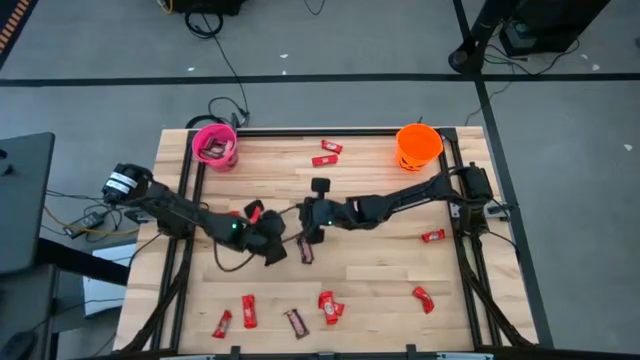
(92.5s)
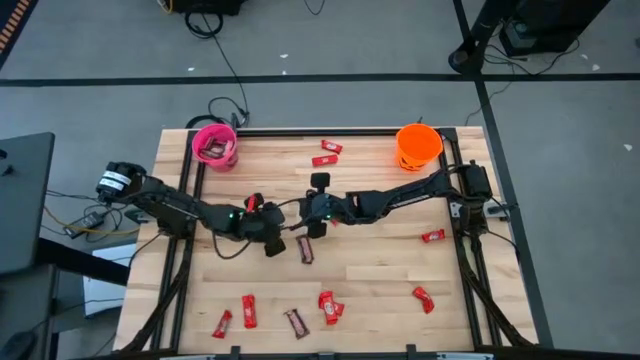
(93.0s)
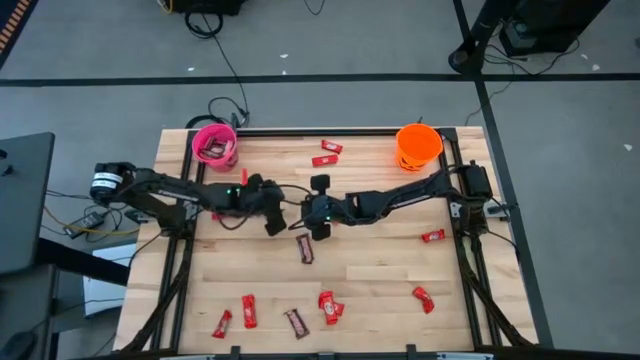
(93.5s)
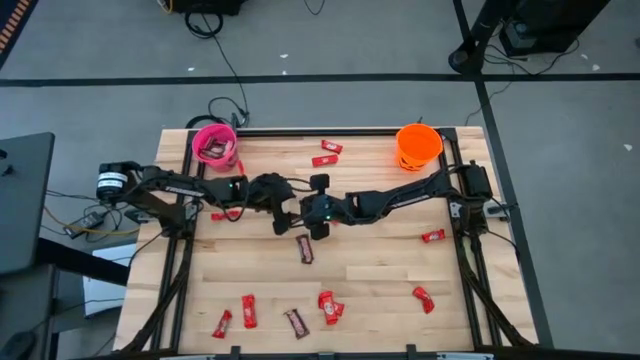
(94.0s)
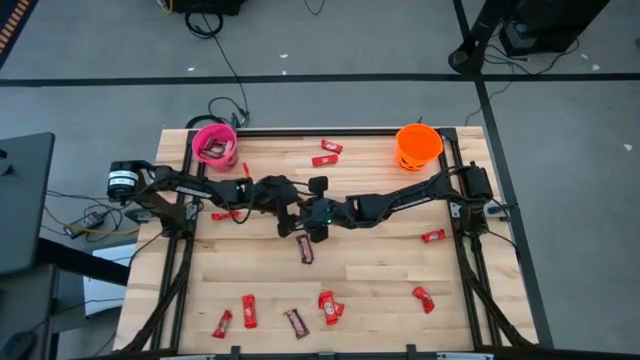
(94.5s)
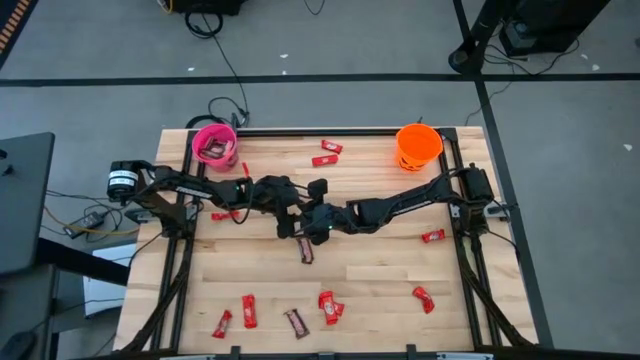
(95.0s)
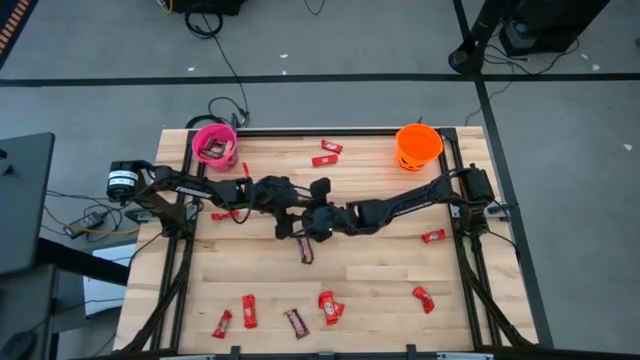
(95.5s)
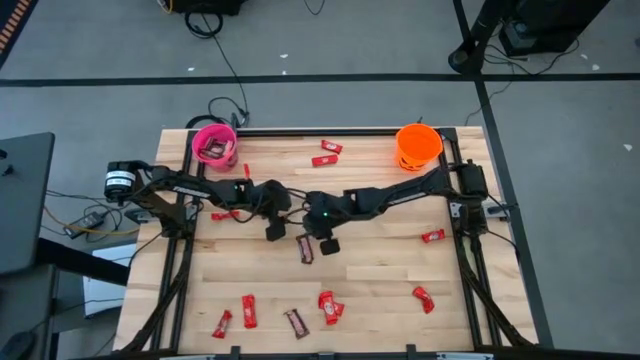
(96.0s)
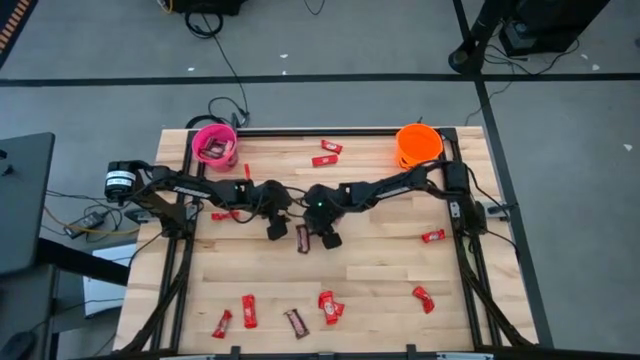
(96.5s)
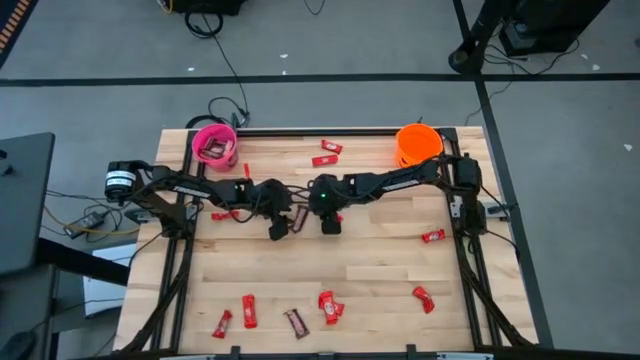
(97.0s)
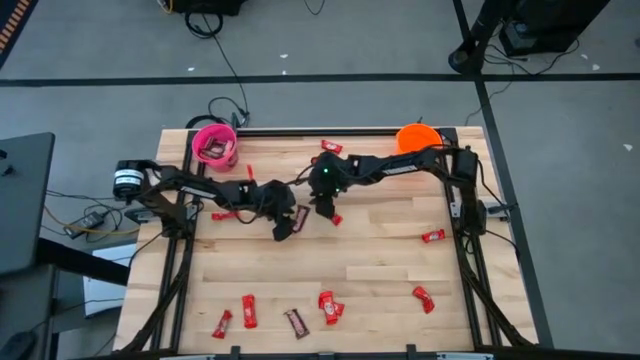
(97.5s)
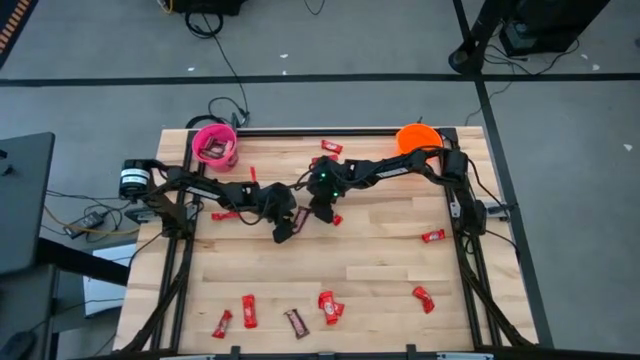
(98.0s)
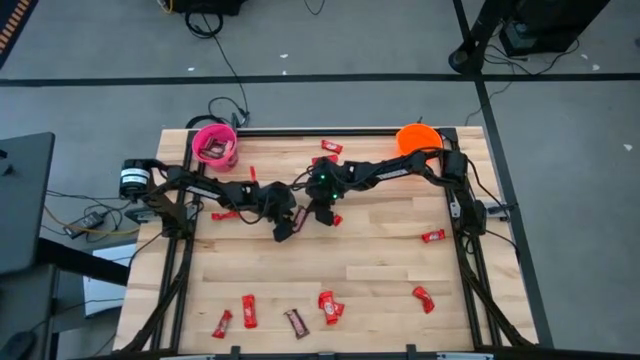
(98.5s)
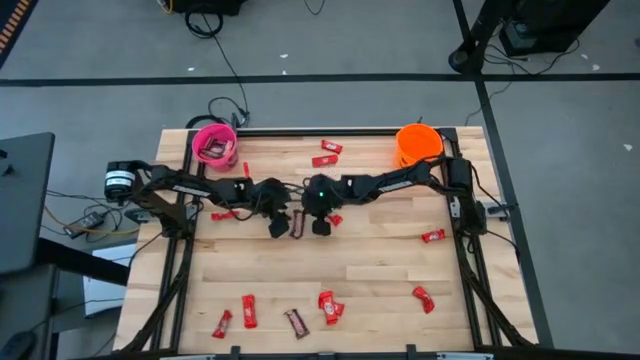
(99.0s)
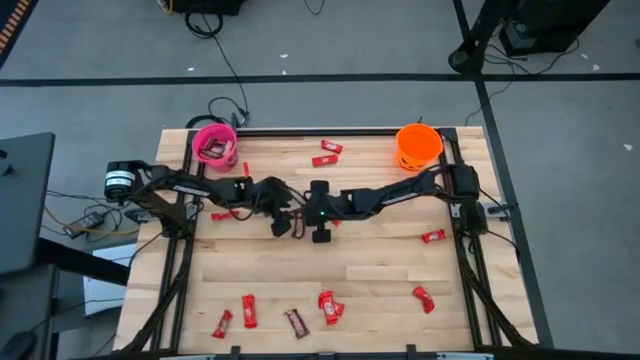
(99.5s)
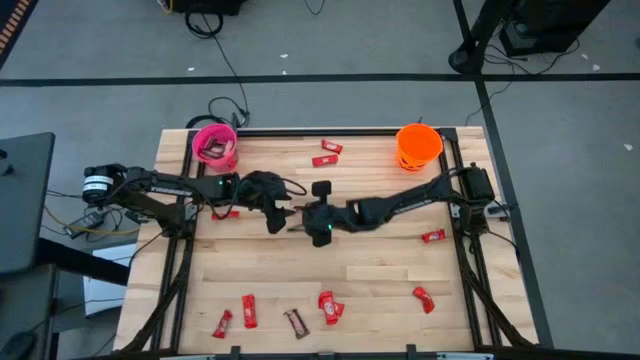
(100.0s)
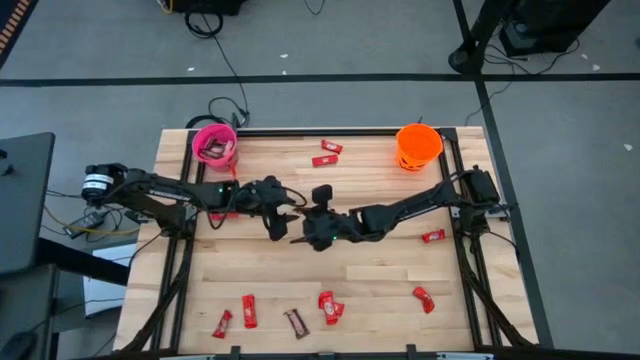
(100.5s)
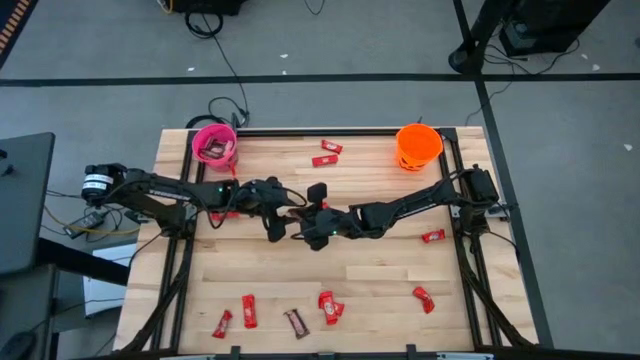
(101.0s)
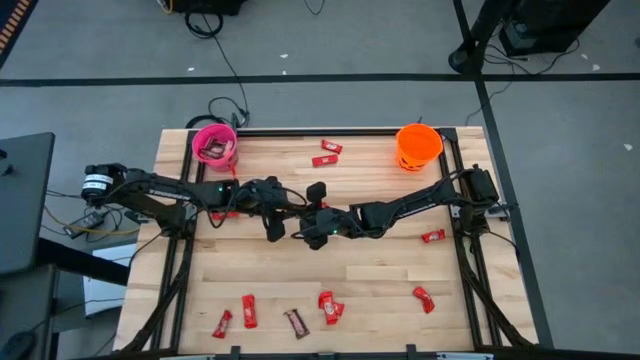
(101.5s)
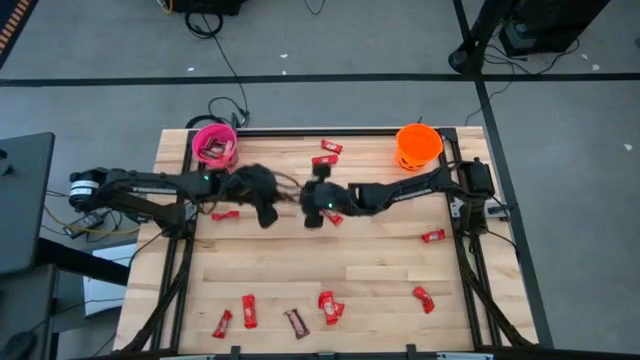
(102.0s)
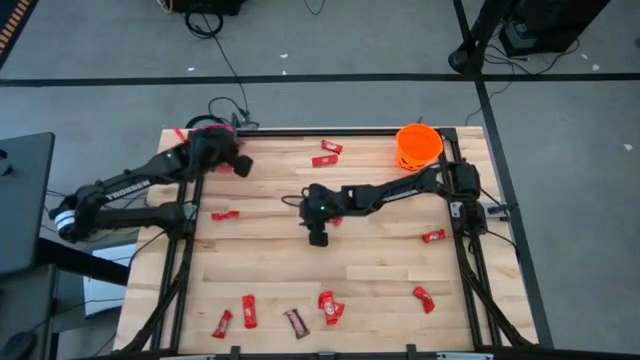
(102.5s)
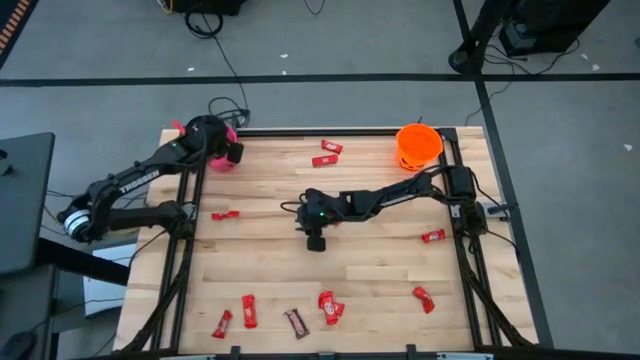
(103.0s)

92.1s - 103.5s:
Task: Sort candy by brand, put in halloween buckets
Put the top brown chocolate bar into the pink bucket

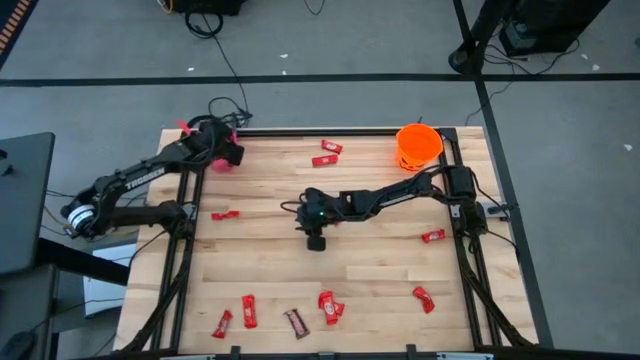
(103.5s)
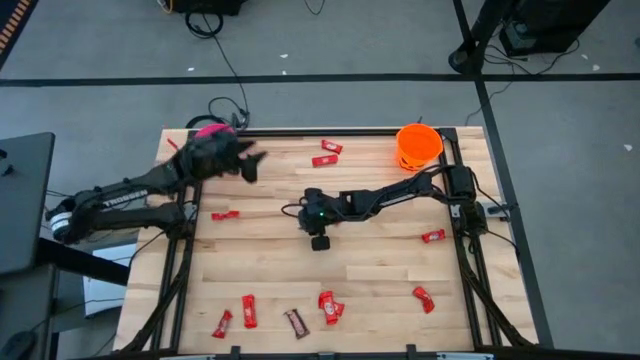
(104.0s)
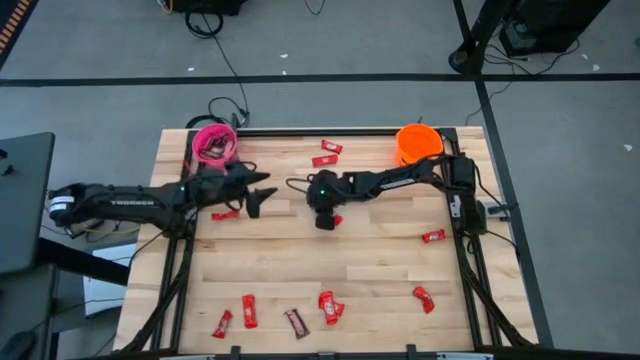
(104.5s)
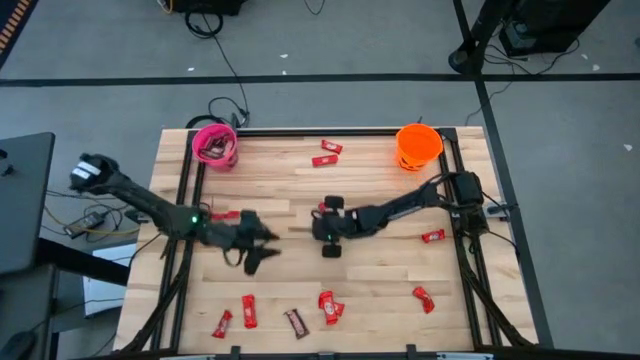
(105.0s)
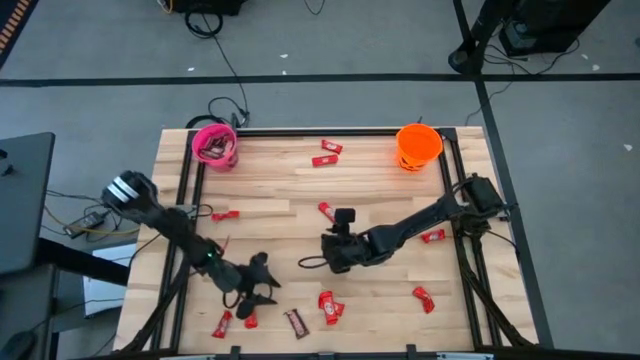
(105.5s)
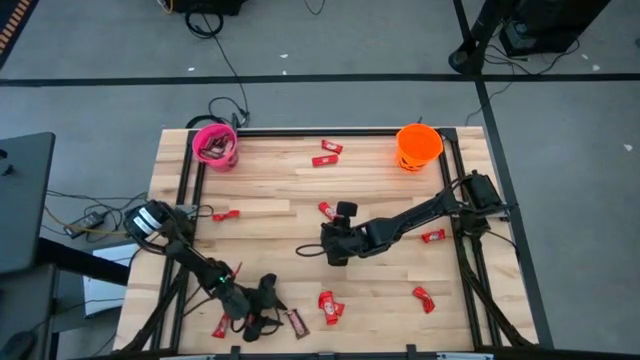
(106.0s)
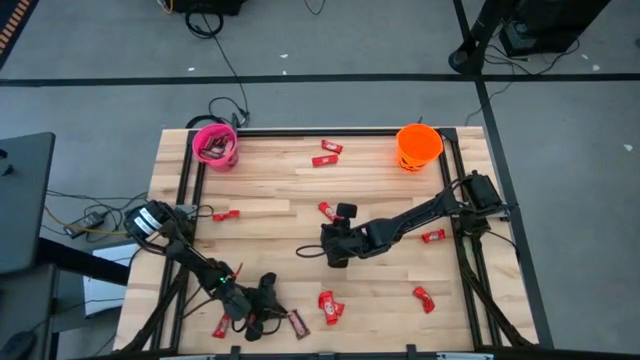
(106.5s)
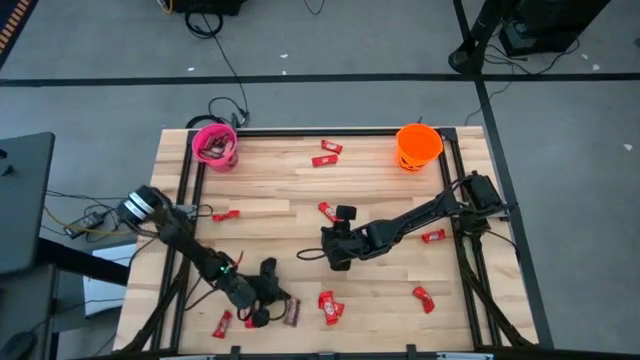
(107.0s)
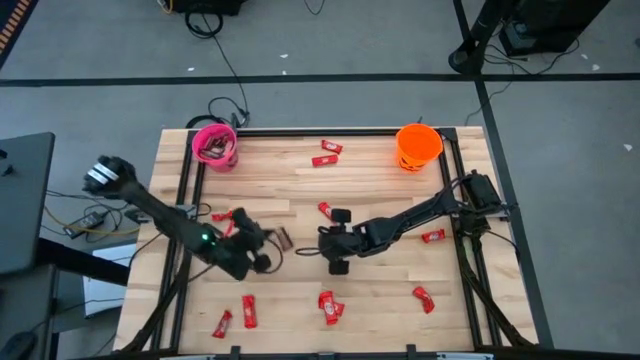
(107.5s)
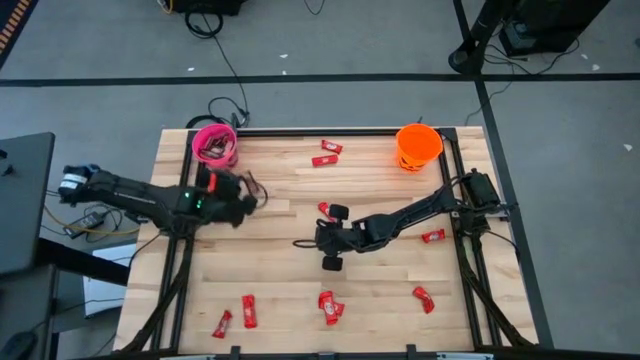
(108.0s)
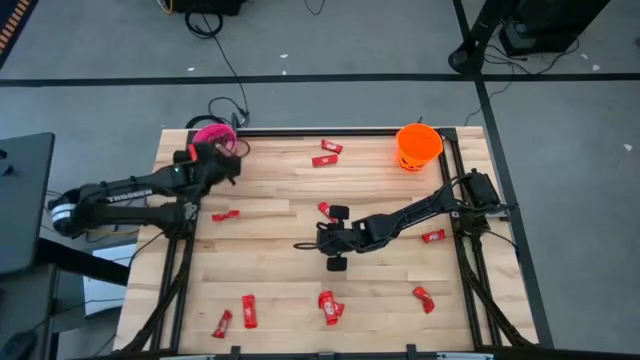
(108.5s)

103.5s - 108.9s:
Put the brown chocolate bar into the pink bucket

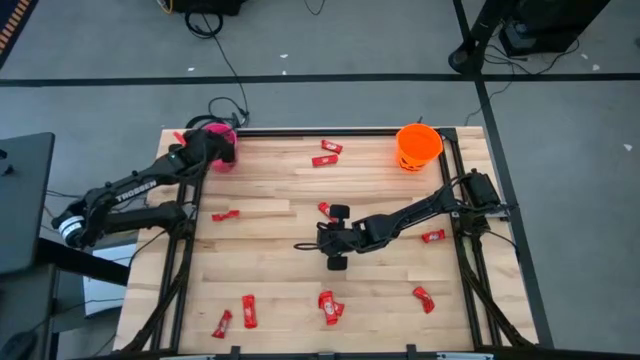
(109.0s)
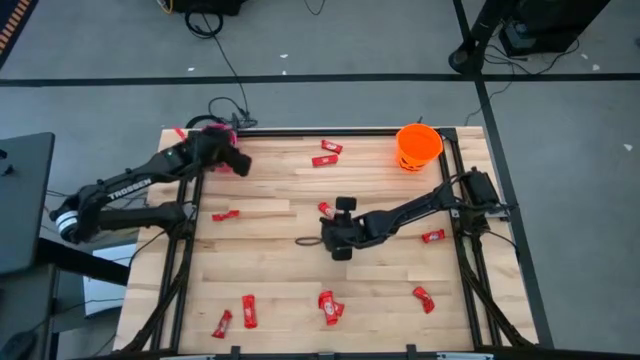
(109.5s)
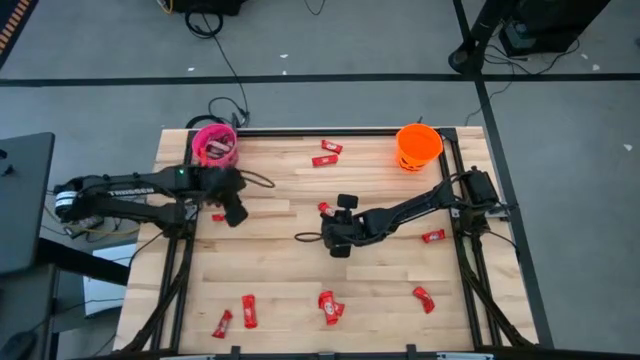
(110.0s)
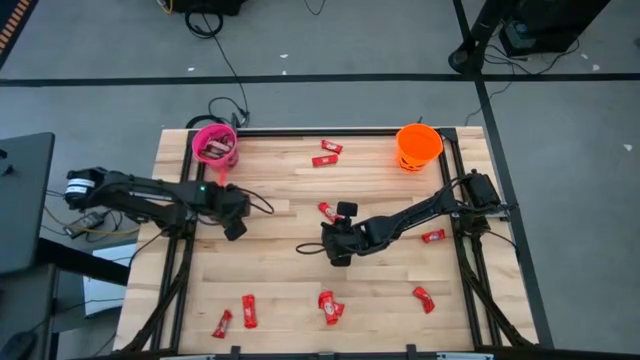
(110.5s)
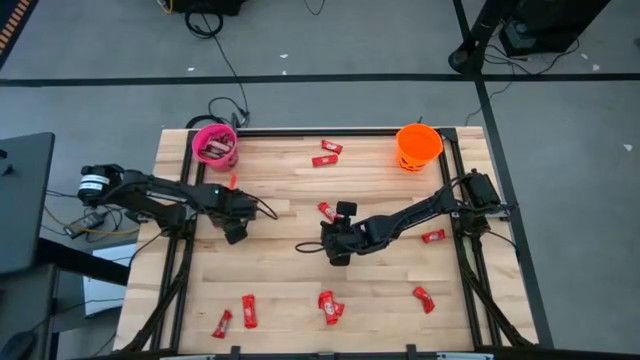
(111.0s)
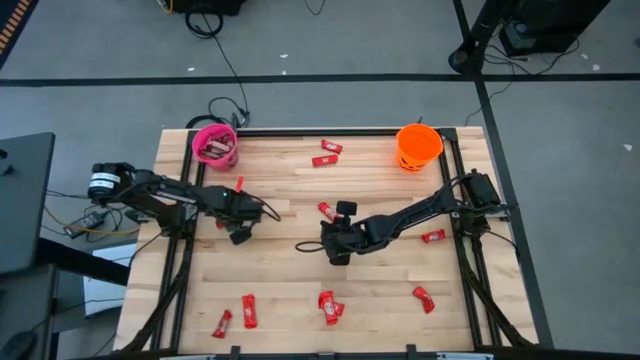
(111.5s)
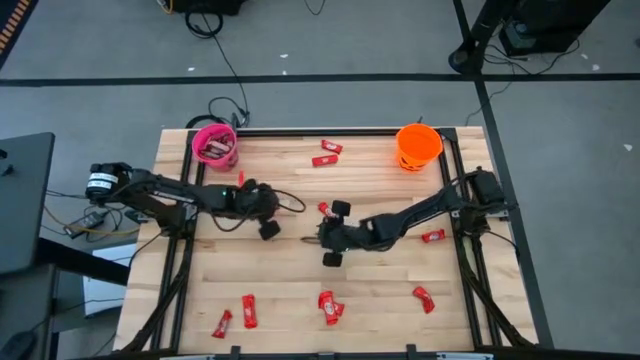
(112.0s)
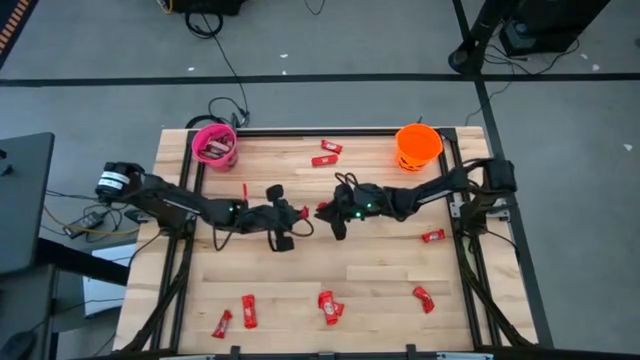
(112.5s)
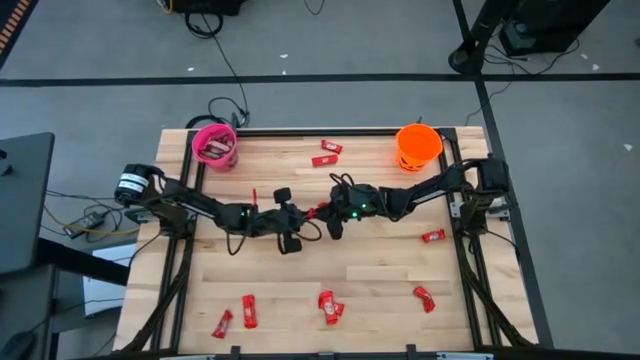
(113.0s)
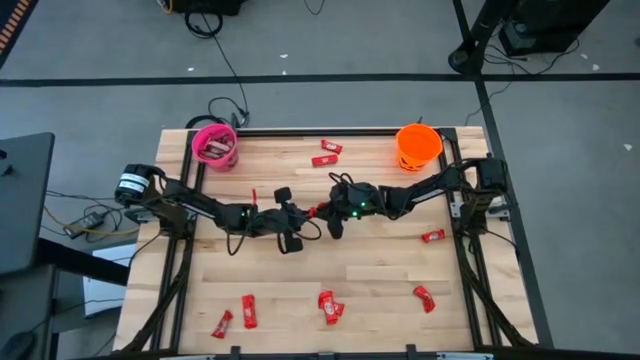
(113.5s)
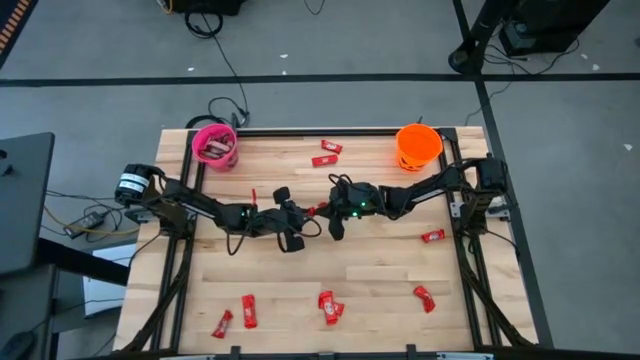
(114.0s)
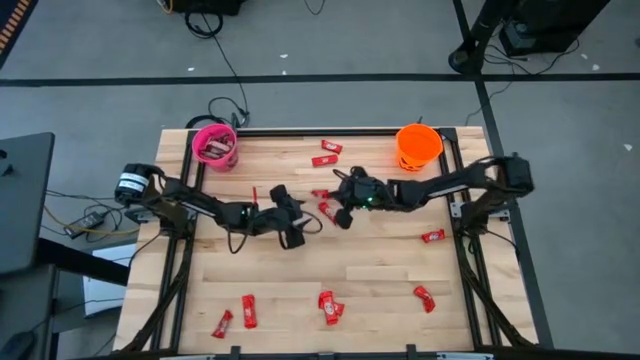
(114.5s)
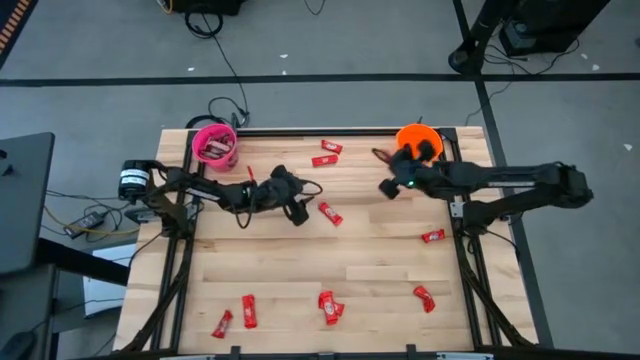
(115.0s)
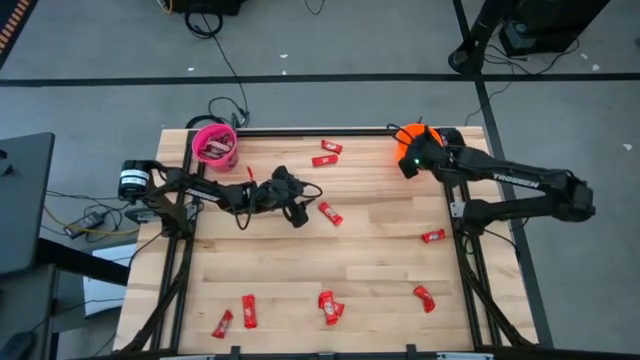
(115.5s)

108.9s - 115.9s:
Put the red chocolate bar into the orange bucket
